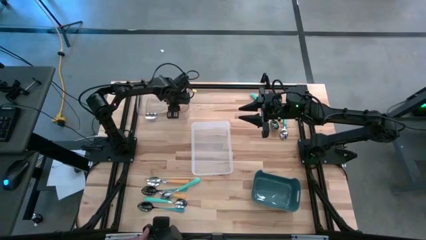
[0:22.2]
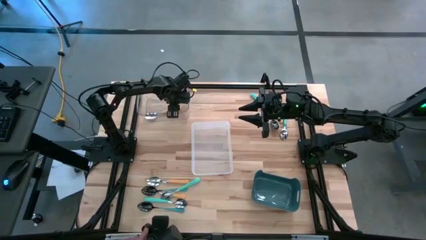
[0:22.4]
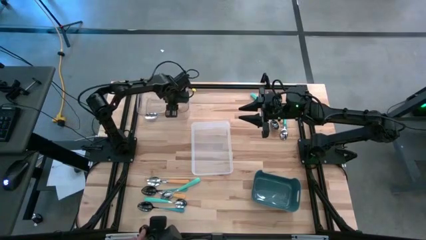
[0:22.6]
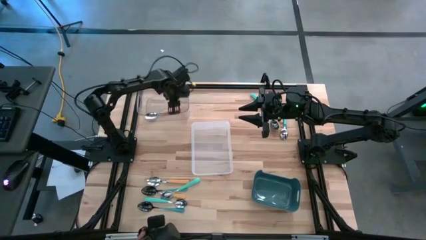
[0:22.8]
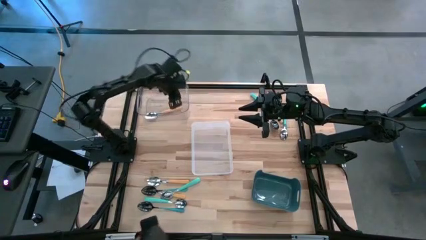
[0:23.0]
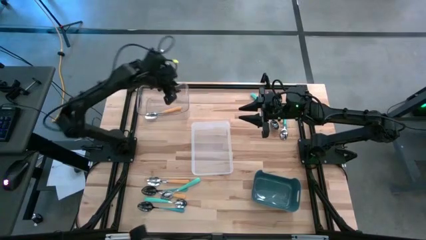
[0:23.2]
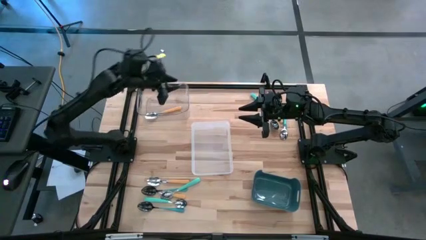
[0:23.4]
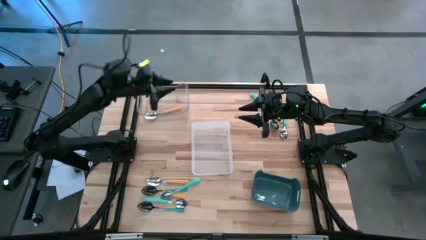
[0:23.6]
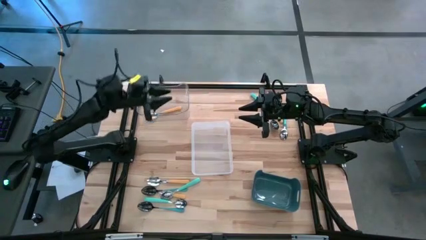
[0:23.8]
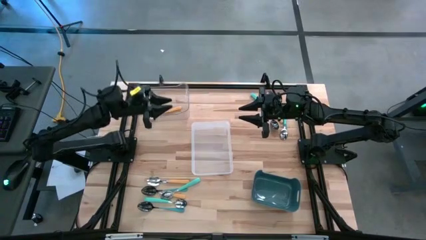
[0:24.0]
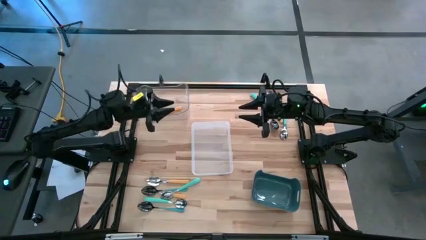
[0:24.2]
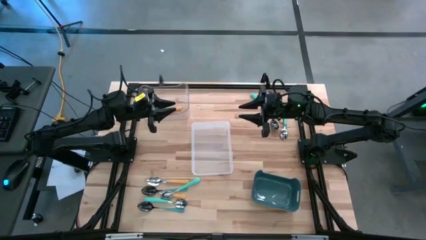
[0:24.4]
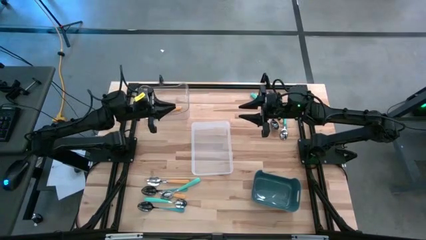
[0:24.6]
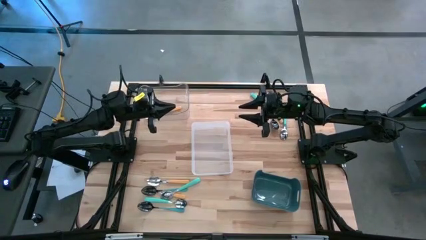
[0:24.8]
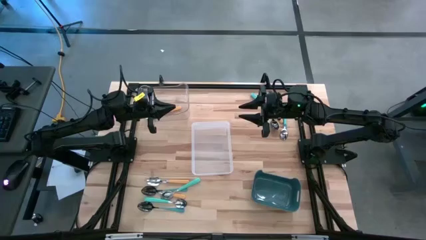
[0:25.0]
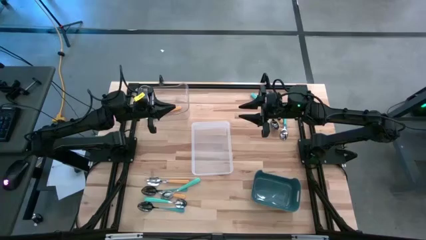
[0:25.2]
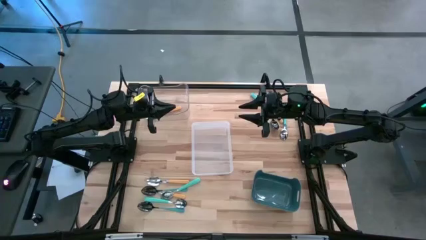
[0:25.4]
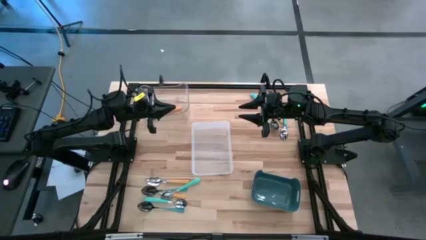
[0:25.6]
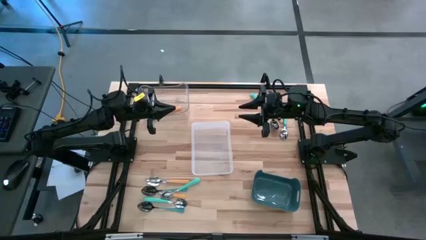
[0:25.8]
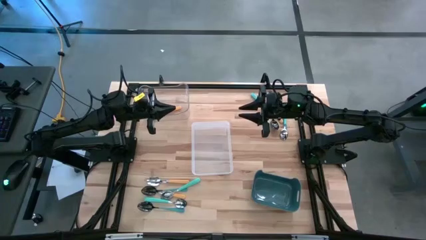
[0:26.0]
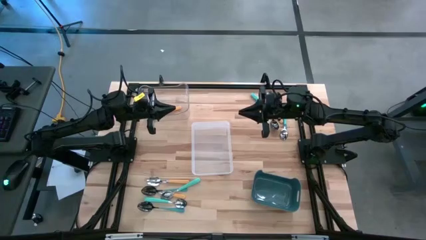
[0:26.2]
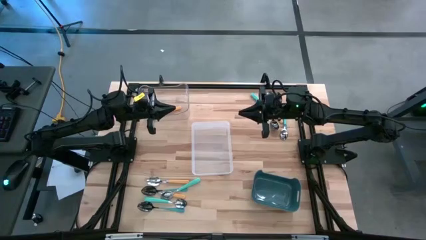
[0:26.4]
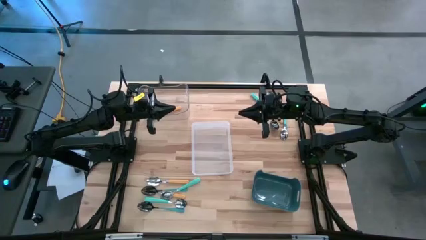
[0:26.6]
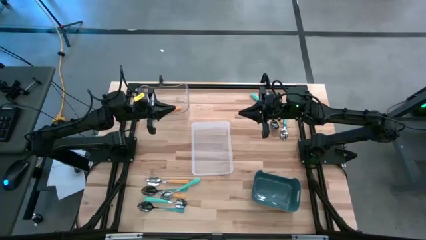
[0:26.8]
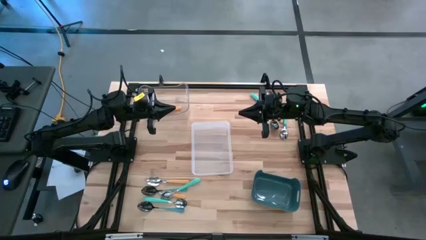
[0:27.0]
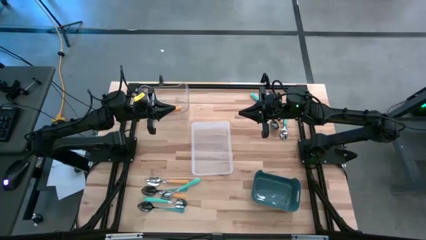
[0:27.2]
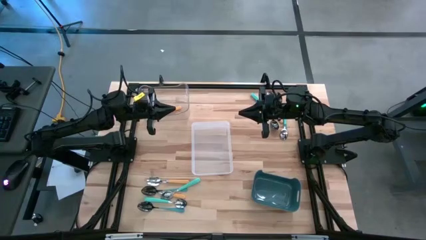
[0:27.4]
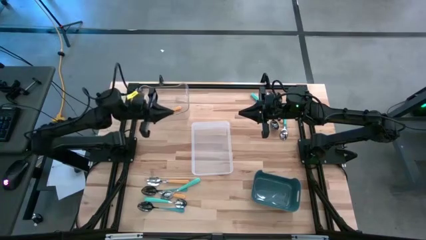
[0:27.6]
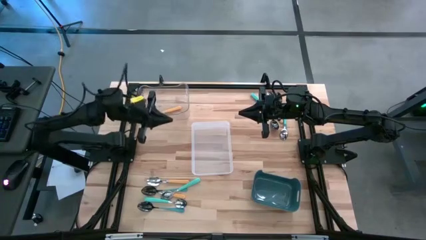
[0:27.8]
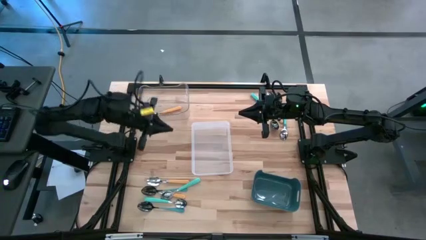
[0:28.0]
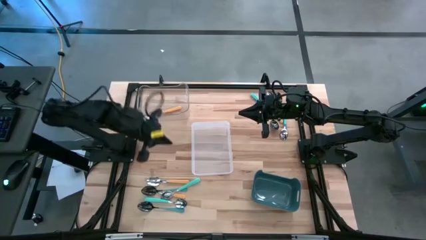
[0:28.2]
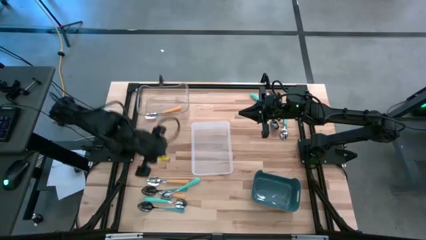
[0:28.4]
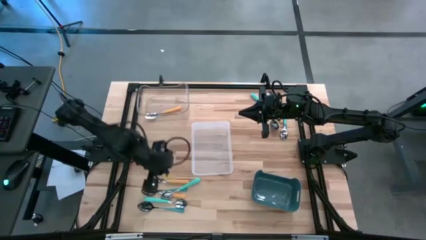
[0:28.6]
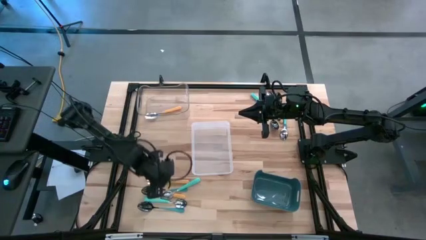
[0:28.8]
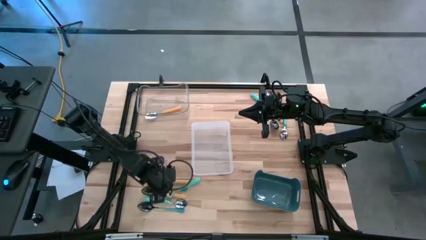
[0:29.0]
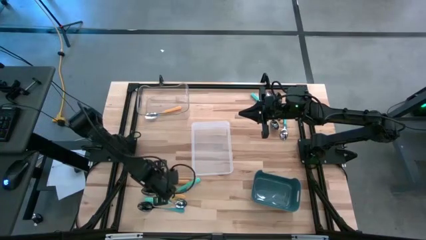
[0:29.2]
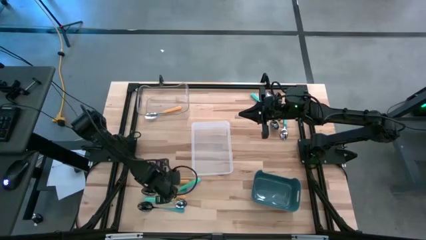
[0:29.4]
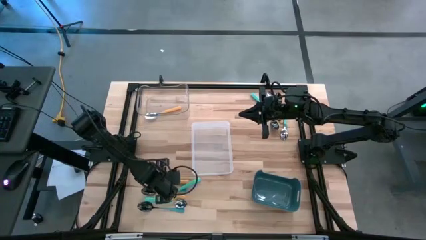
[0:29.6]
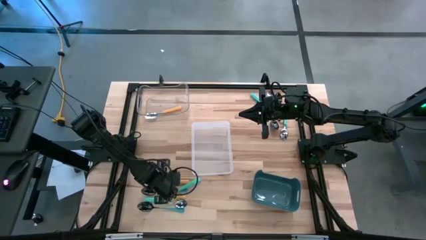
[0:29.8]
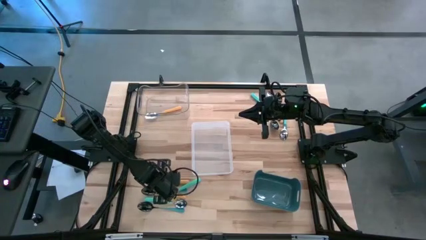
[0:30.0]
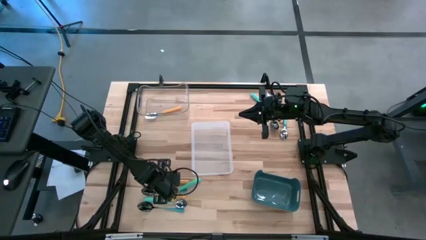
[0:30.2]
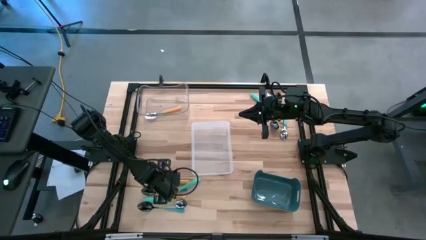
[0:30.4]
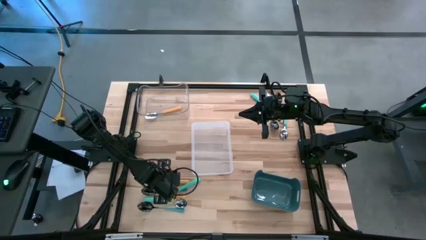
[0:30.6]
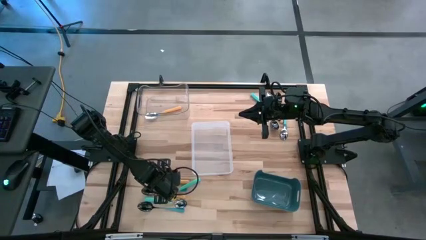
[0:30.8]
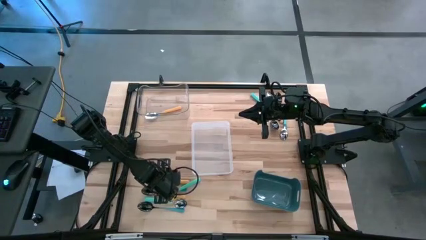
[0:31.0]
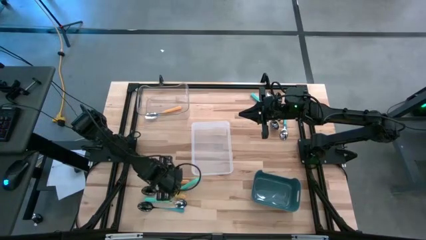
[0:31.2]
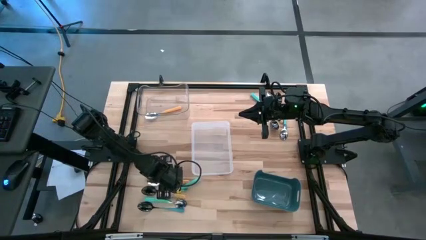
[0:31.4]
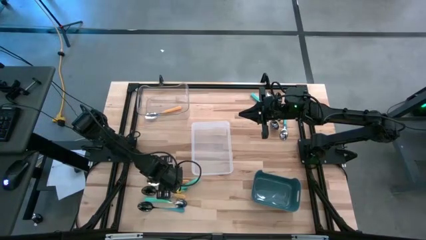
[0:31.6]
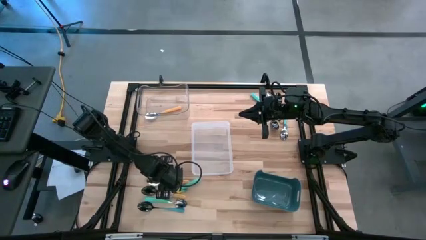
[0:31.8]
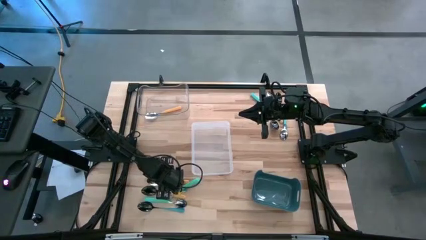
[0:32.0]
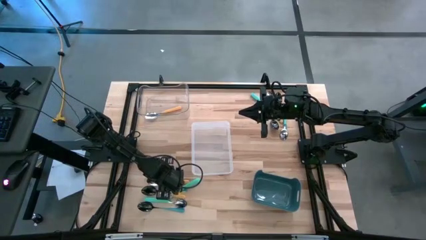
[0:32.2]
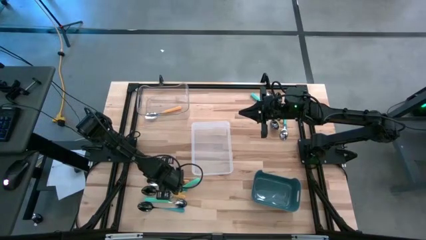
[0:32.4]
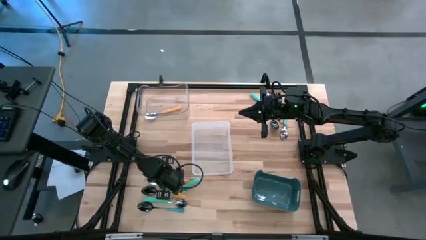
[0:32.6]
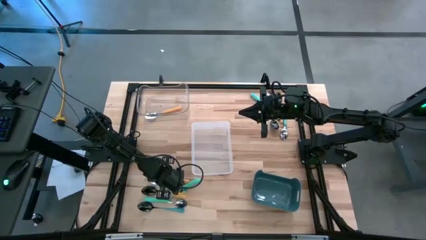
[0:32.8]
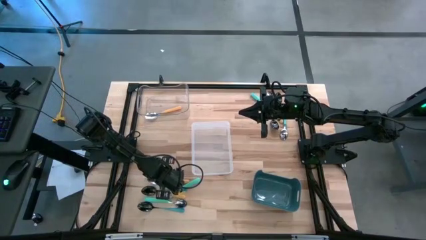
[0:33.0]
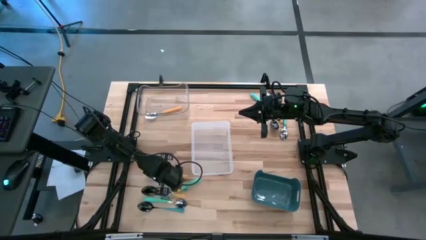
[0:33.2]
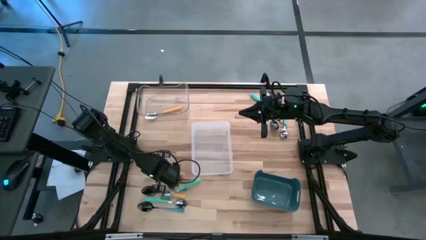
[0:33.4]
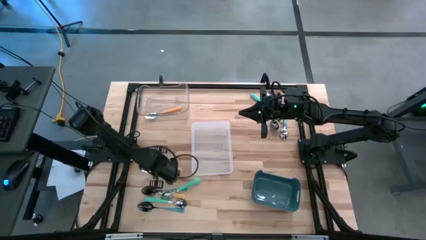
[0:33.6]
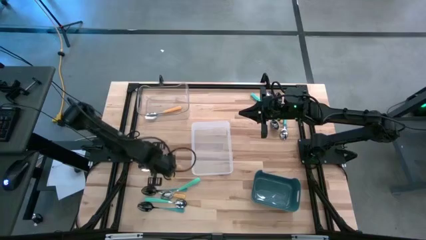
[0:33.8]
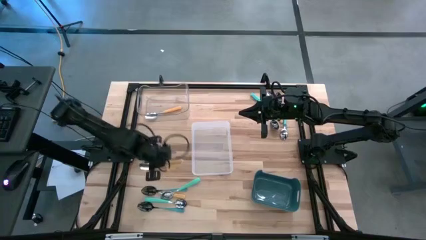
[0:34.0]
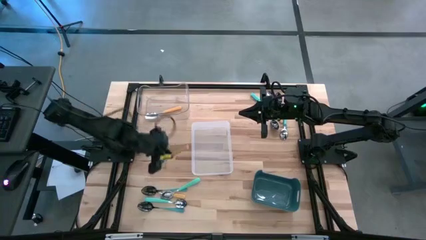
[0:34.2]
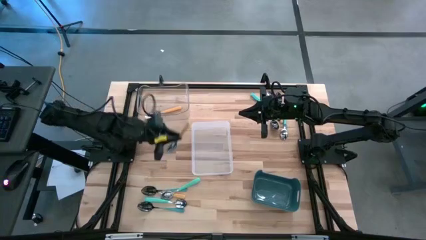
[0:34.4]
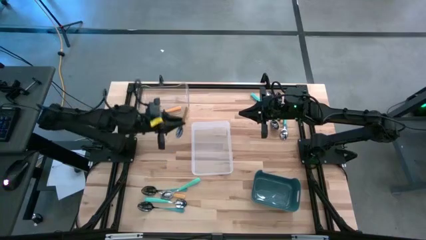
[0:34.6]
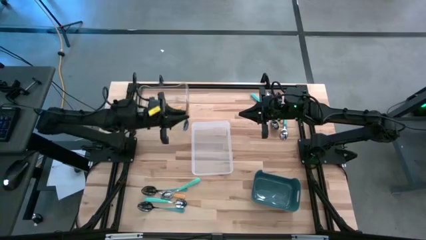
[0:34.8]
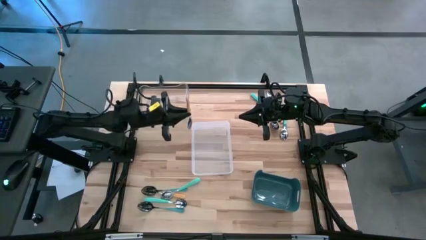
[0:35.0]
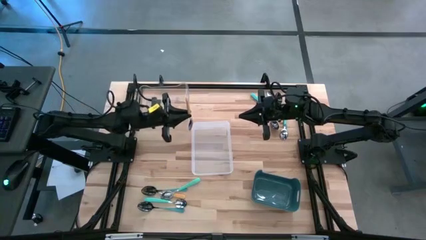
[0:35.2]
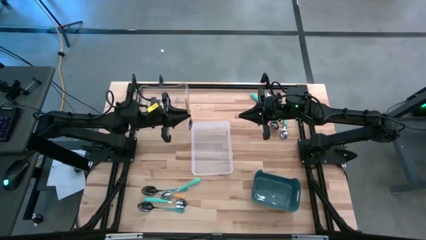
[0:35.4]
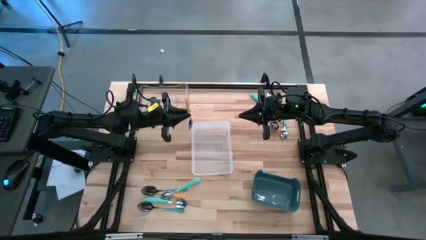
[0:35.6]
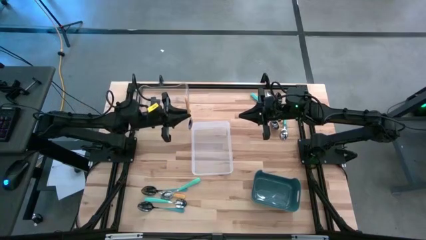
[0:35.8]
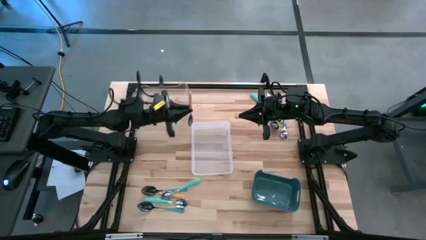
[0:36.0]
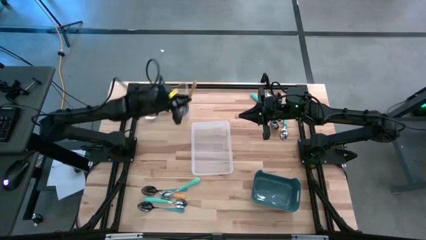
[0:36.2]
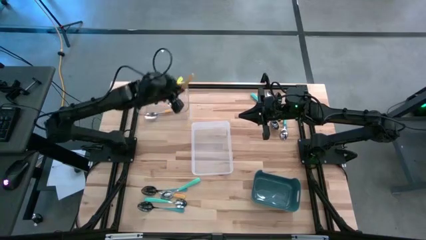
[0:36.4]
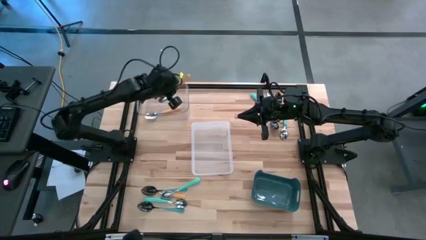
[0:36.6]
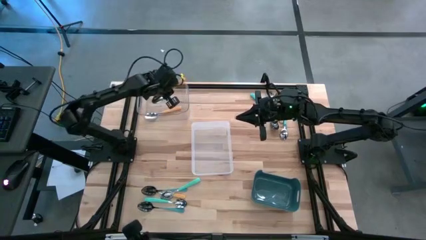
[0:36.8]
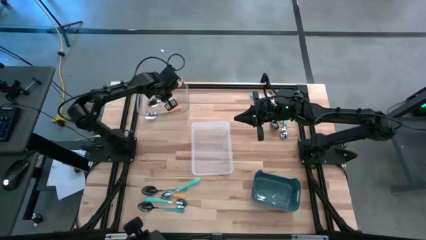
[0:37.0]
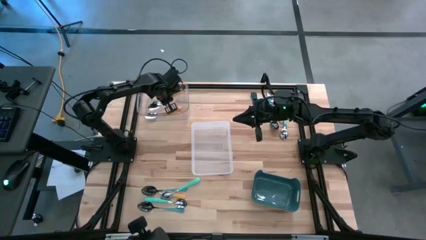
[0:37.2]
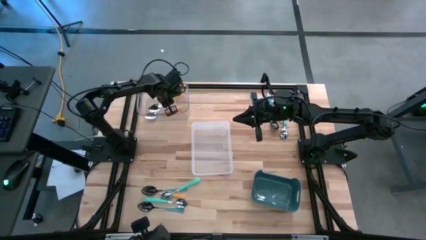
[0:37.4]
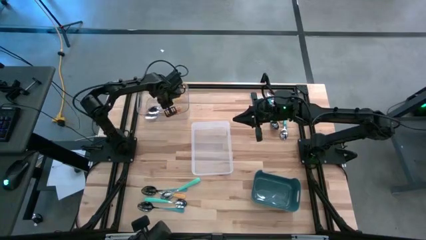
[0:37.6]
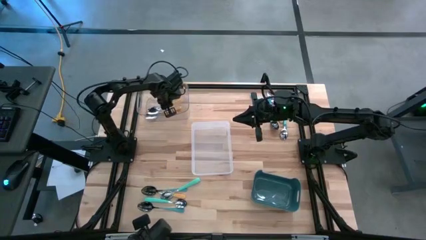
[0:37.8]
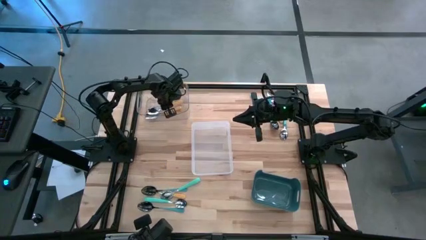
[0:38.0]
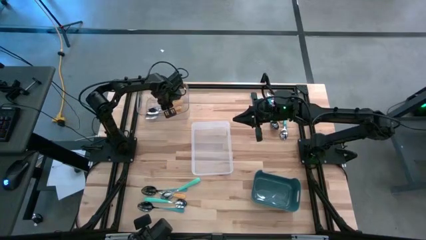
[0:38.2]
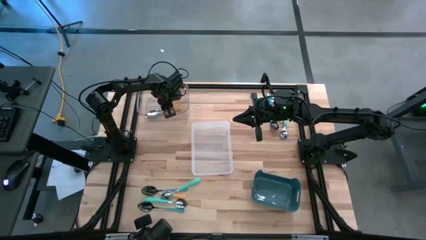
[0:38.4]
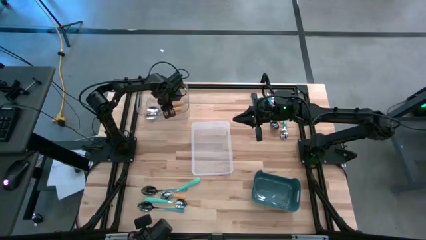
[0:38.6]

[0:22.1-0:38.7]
Task: Sort silverware by color (type)
Put the yellow spoon into the transparent bin
